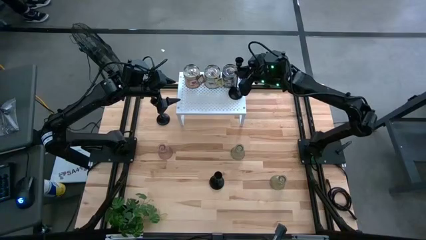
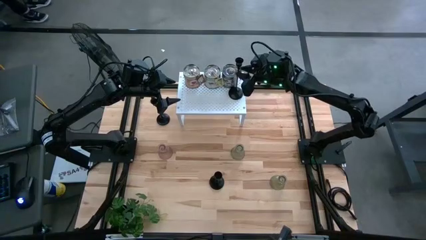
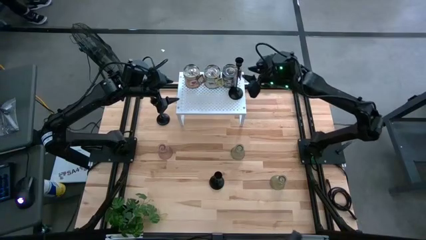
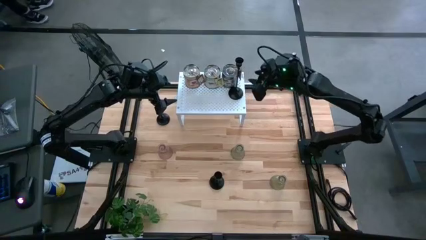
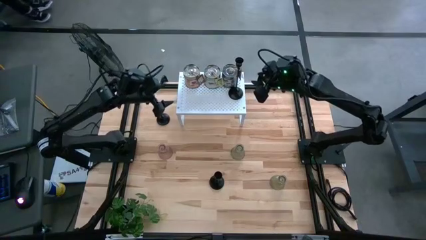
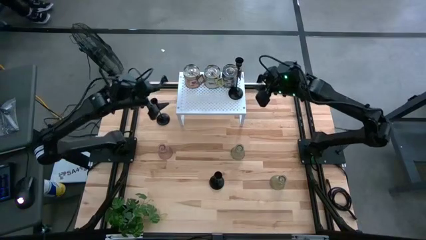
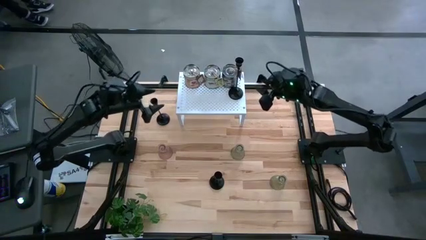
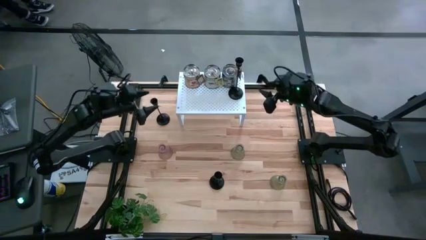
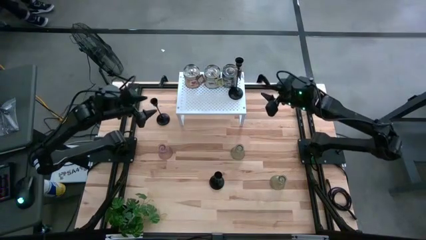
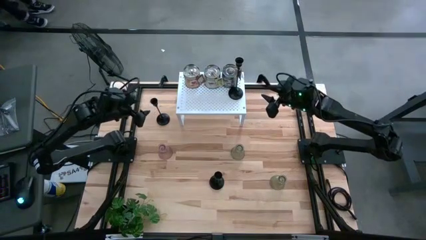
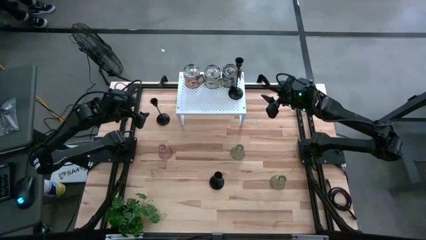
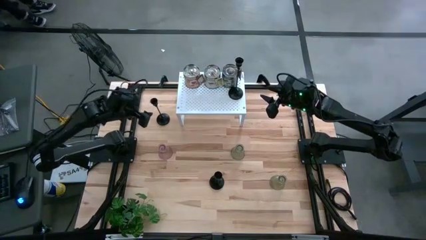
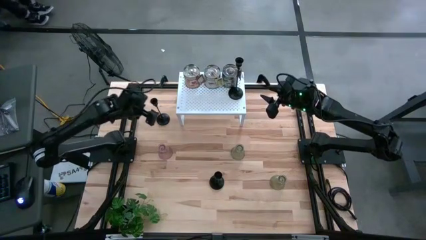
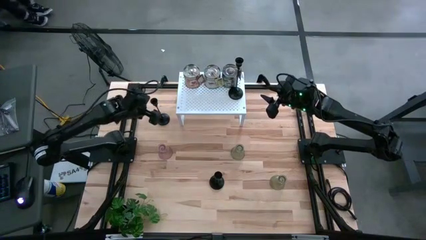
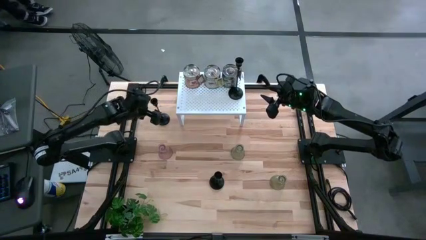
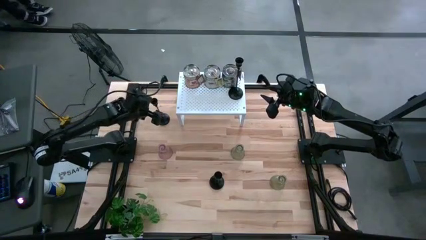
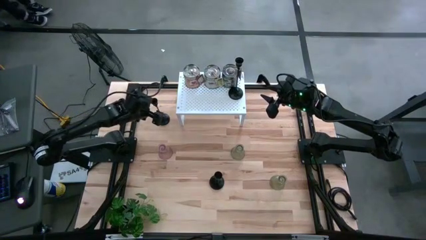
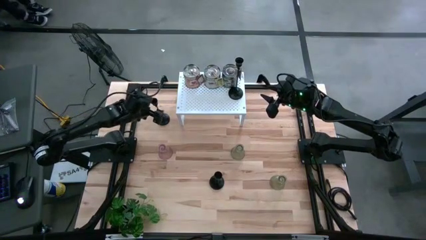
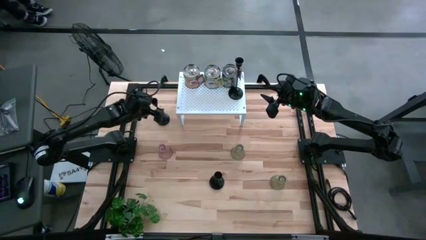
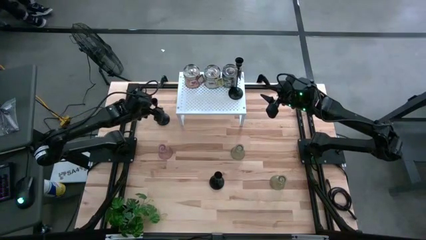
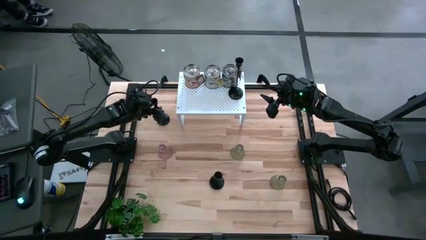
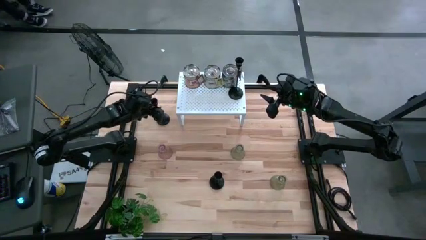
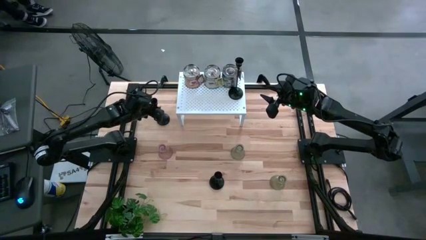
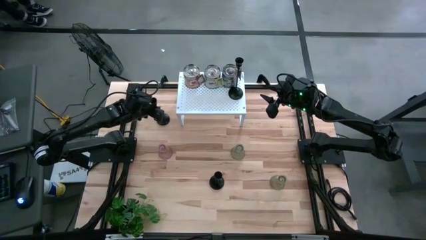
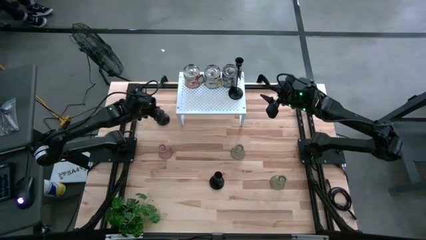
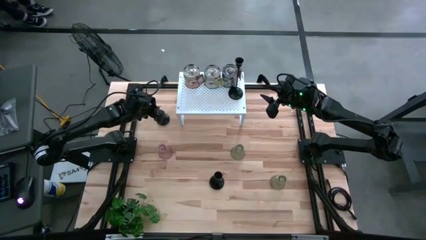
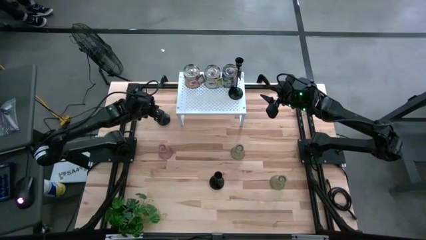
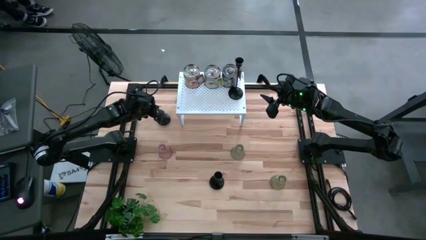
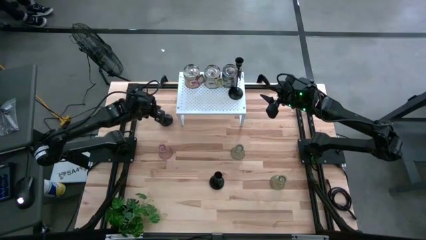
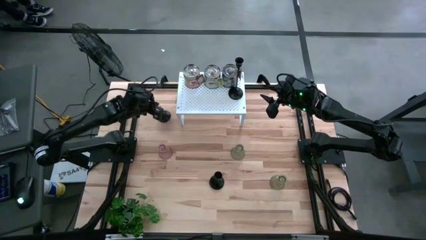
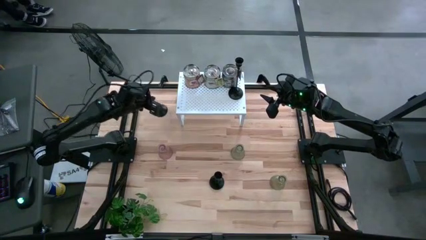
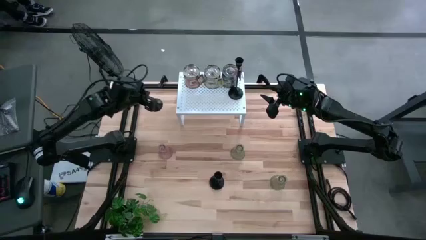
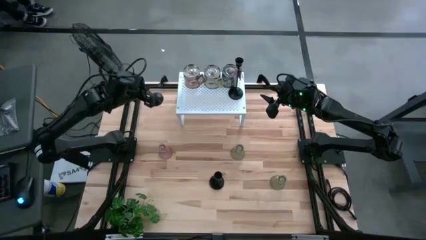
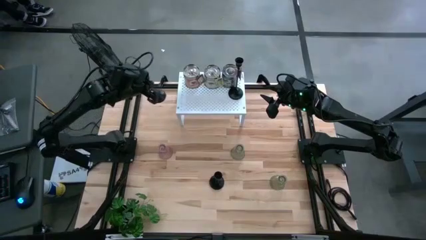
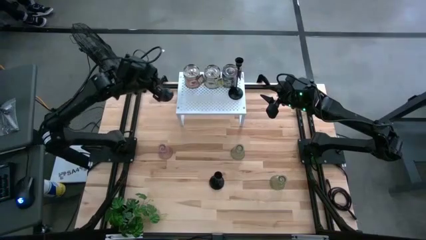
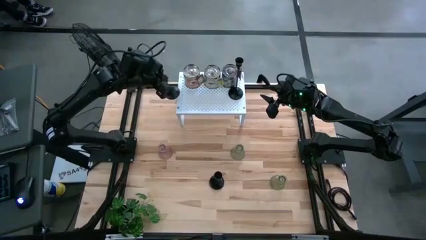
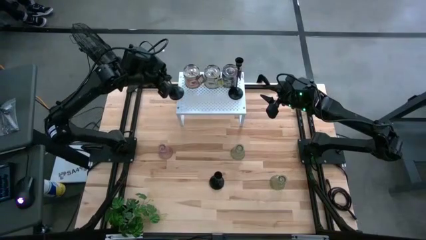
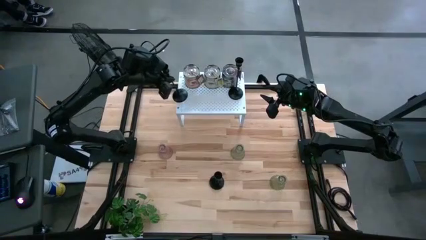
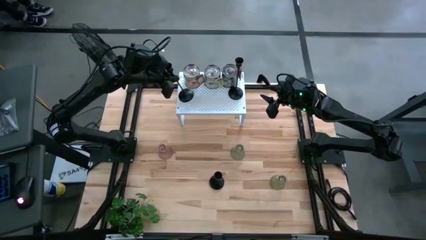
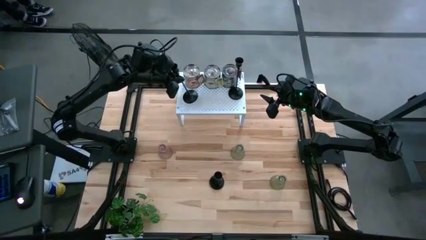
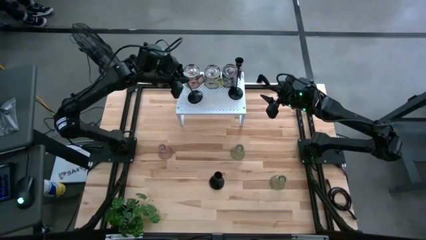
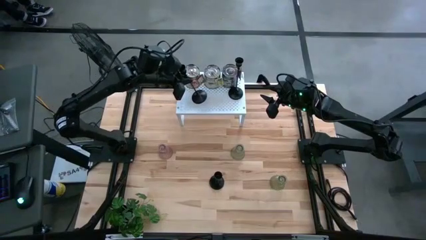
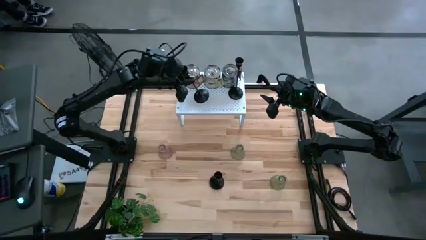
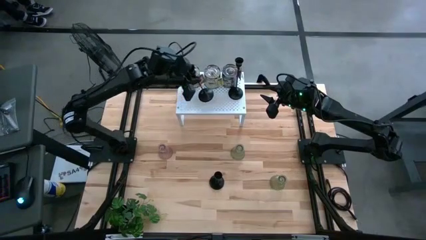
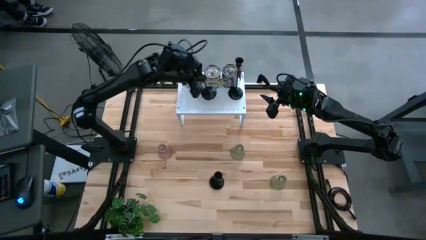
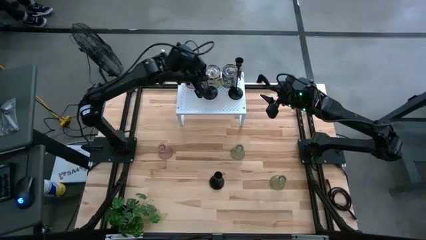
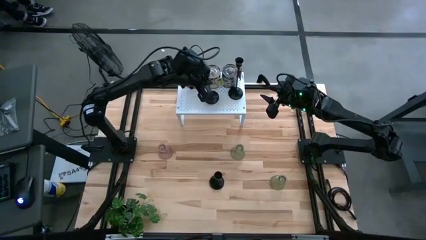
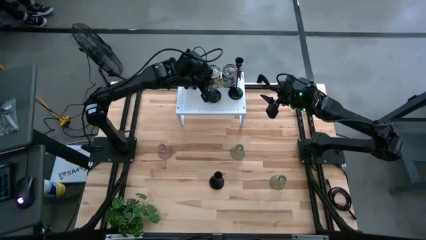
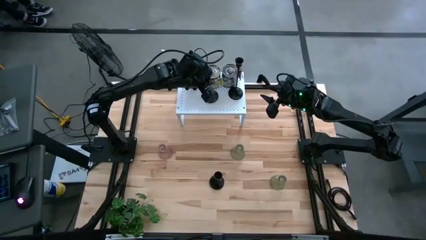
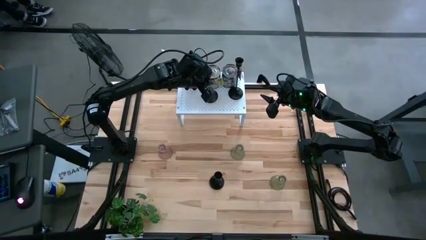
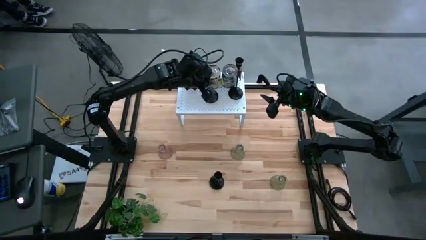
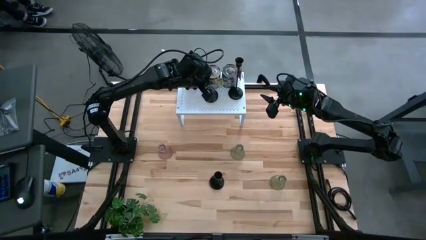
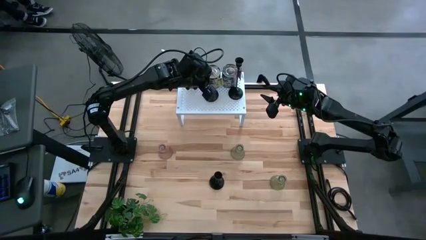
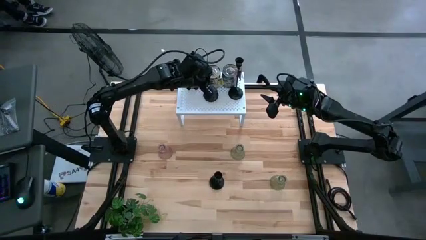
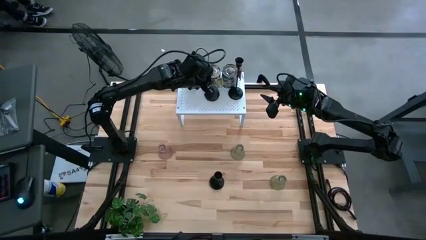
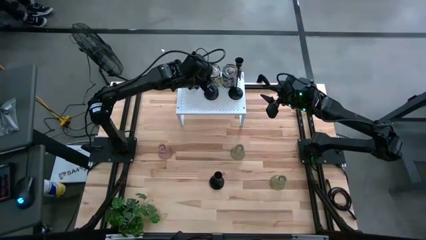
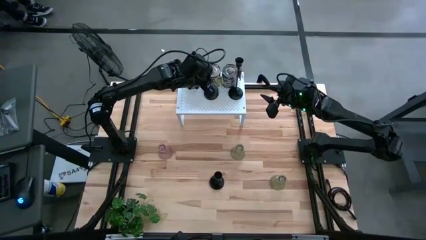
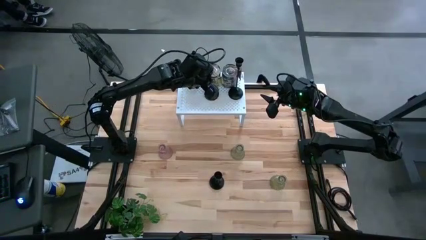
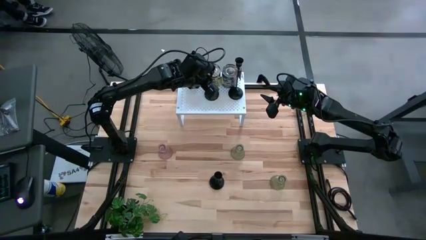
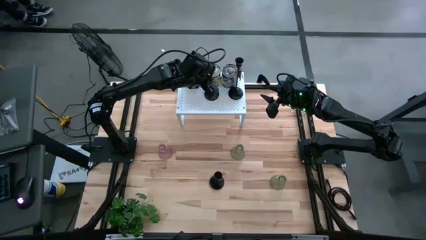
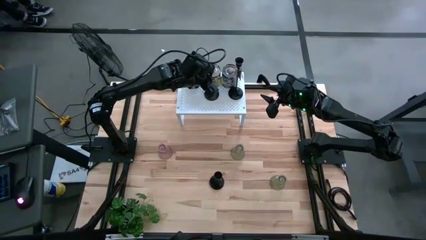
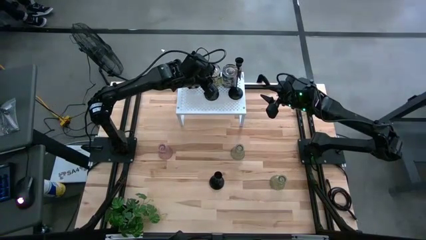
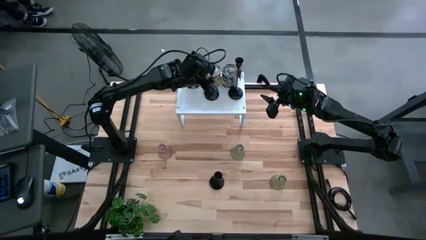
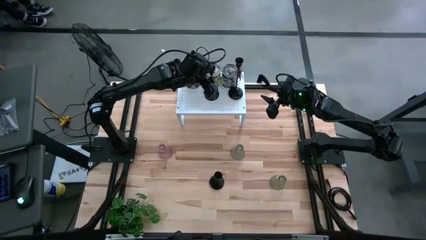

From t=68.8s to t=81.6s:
Task: Pick & Place candle stick holders
Align the top black candle holder on the shelf with the other black candle holder

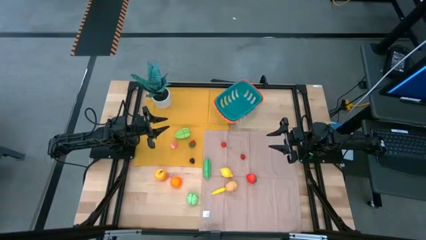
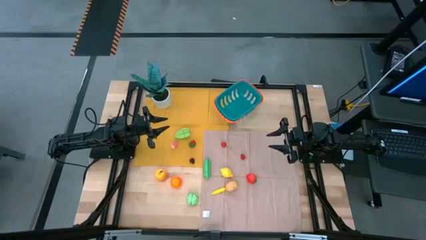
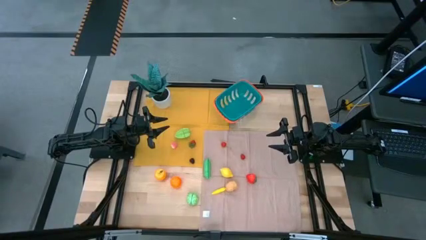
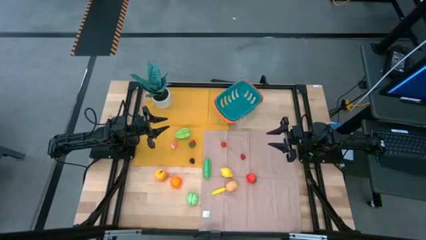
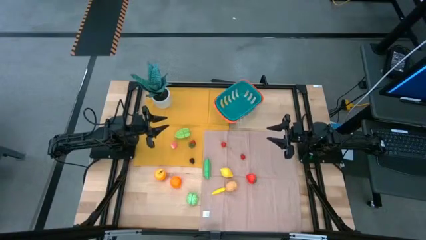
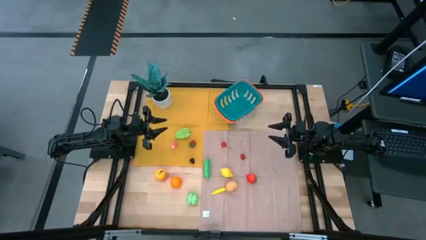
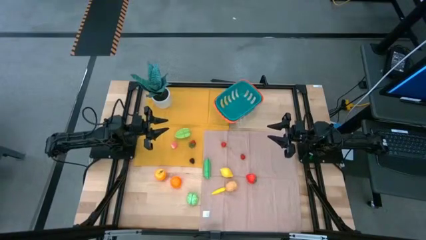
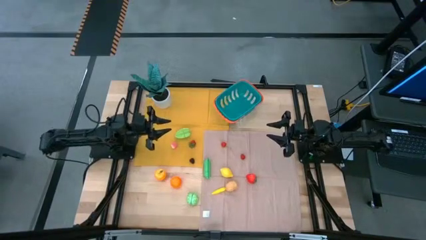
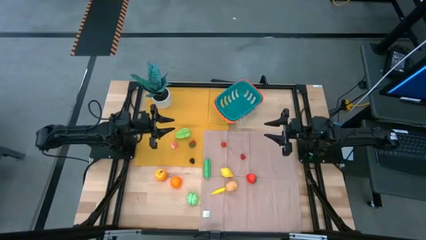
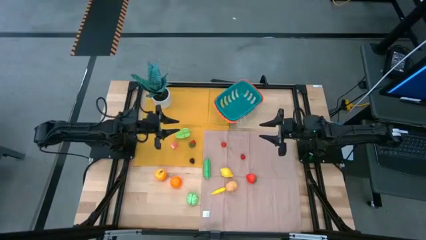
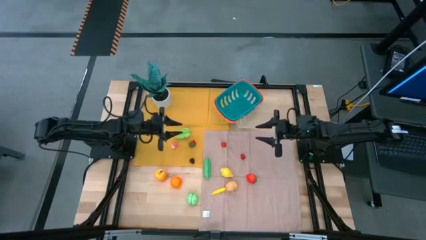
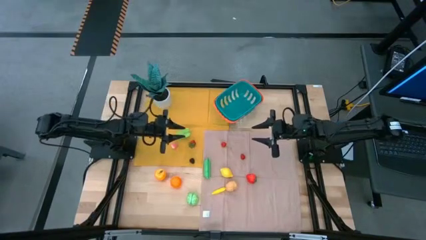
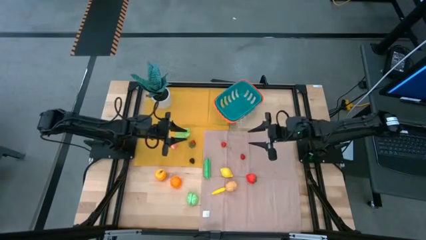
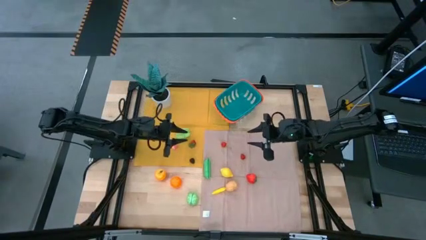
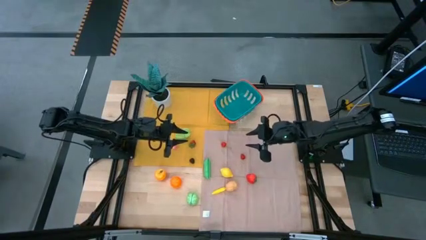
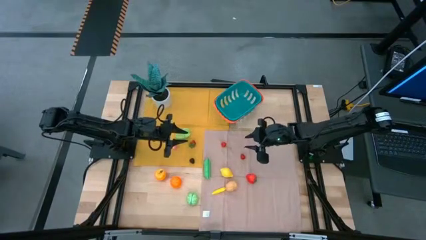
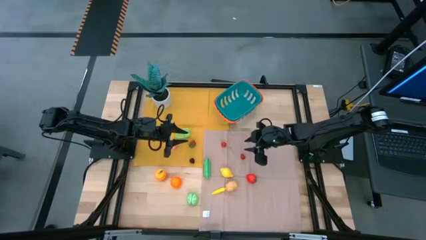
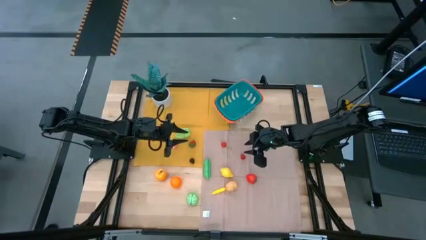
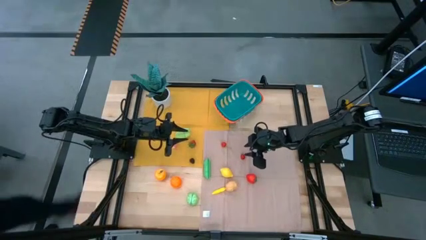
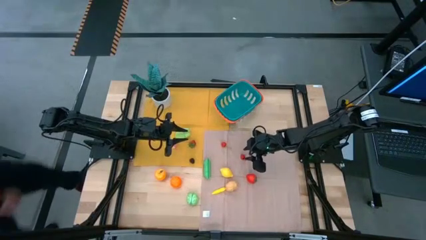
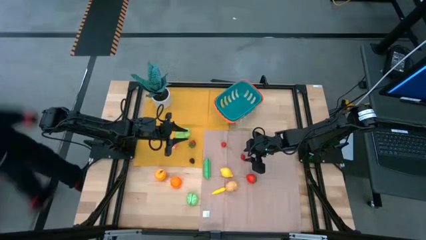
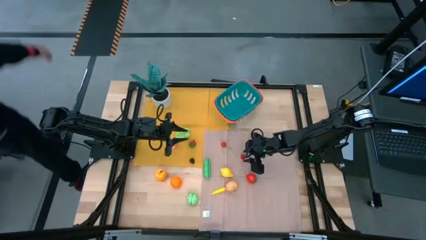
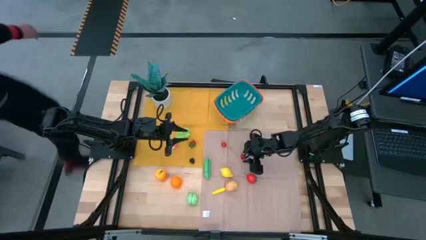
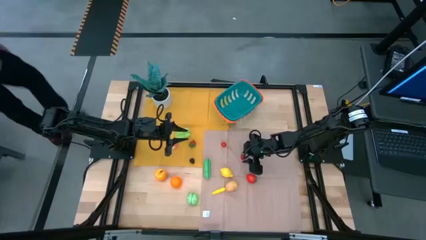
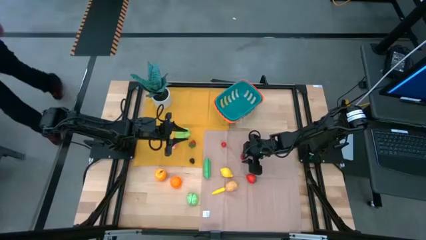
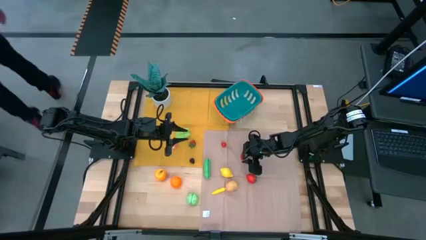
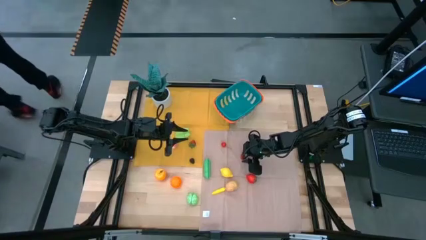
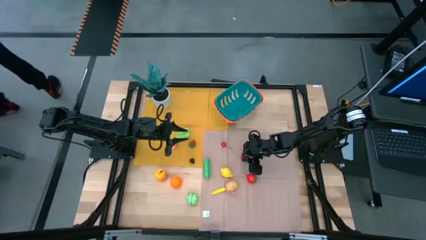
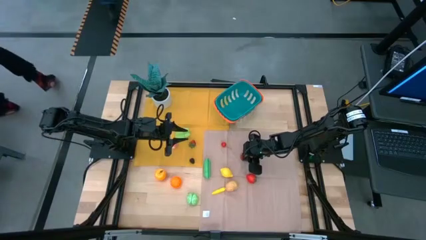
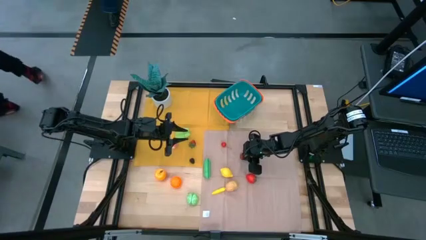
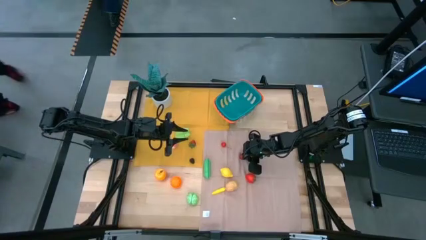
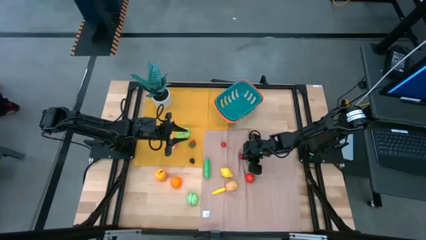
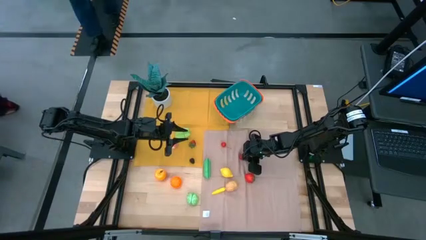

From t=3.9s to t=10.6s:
Task: Pick and placing Produce into tupperware
Put the top right strawberry into the basket
